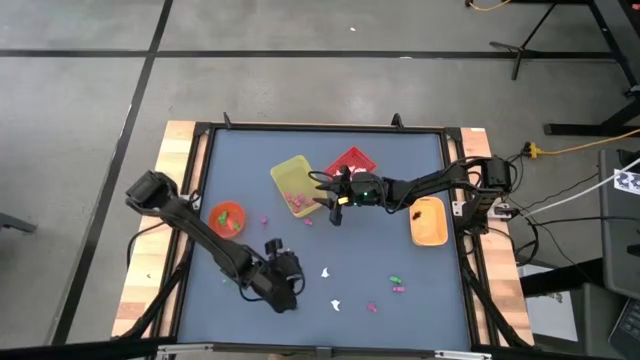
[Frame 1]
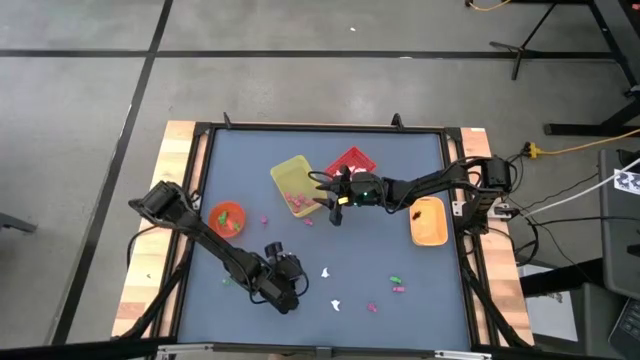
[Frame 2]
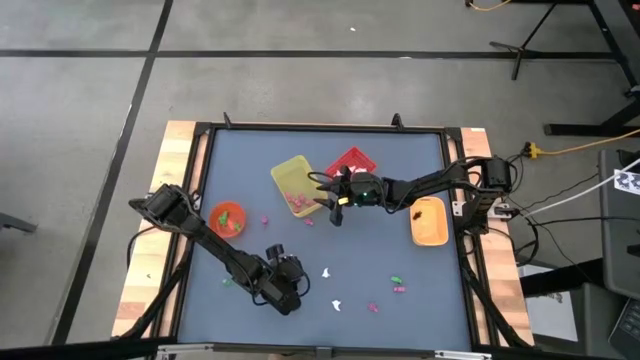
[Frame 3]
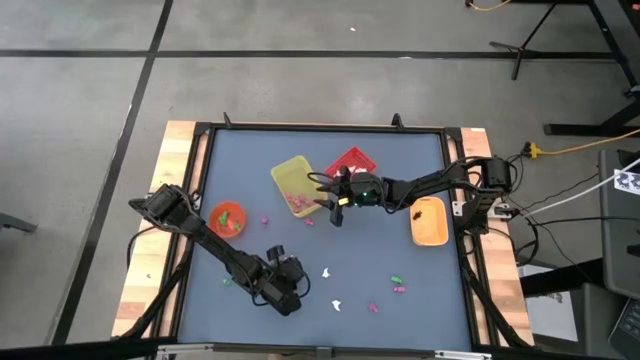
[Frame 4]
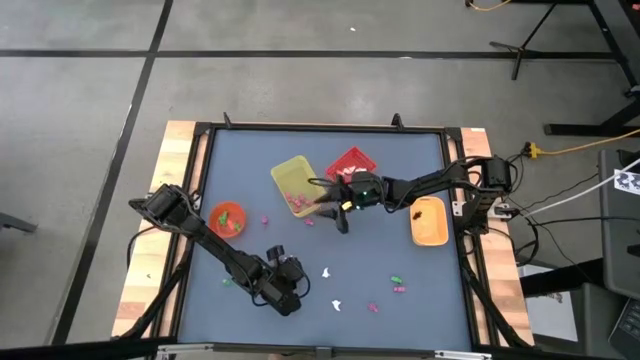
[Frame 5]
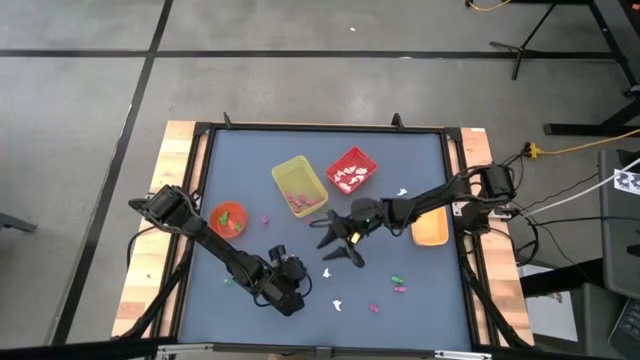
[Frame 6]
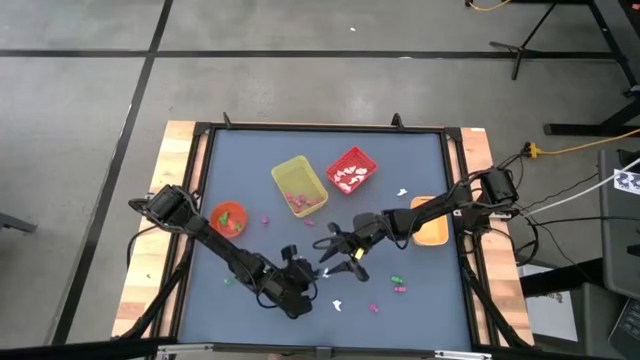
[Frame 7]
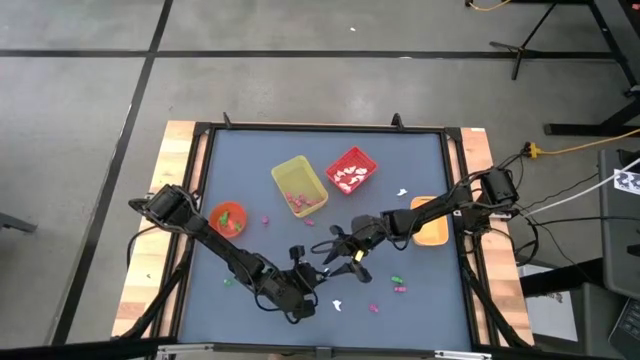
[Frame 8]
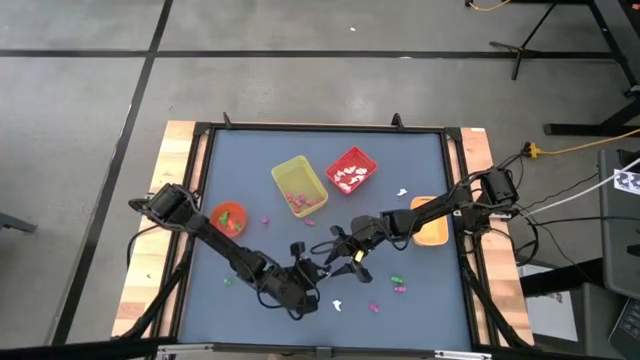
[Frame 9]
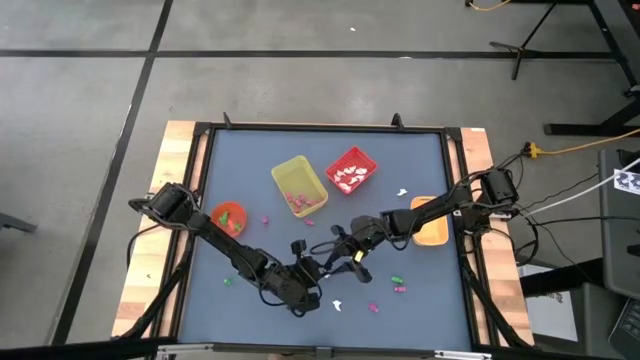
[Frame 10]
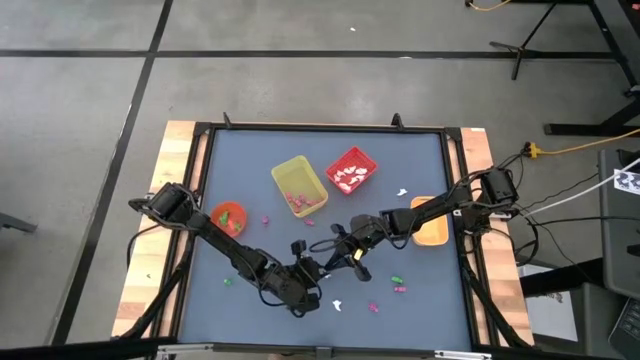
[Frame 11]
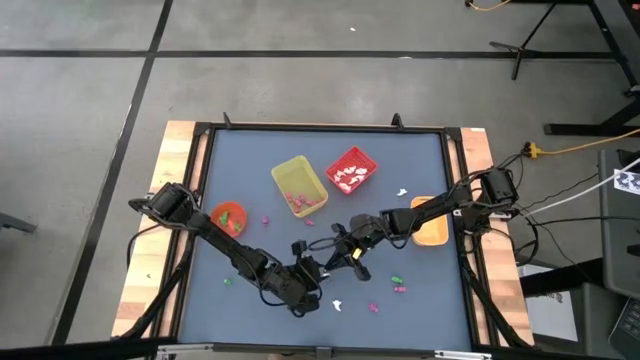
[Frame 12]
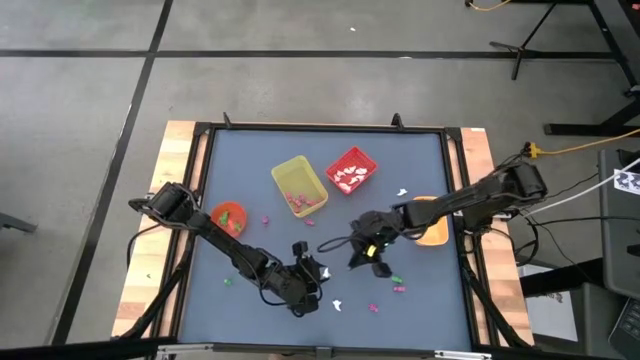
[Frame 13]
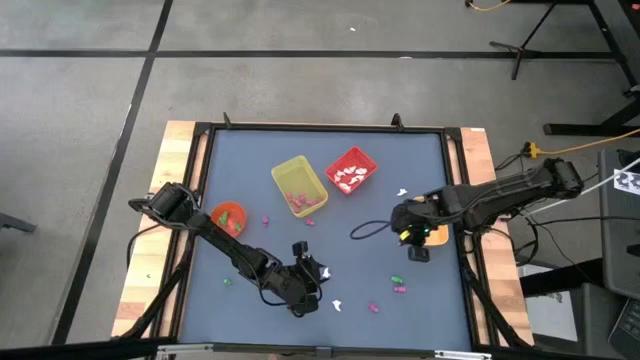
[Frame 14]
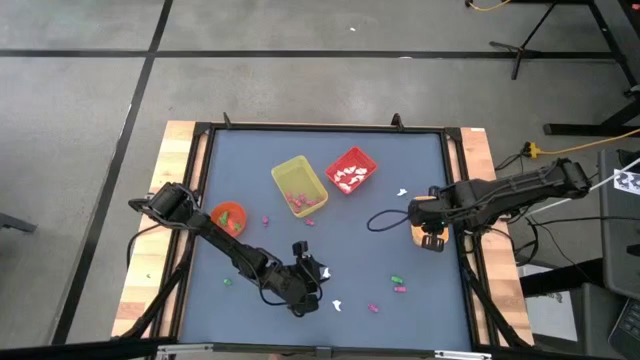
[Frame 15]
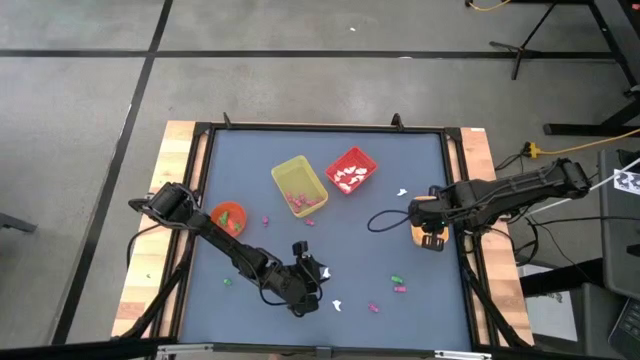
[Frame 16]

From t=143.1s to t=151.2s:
Task: Sort Halloween decoration
Put the black skeleton toy into the light orange bin

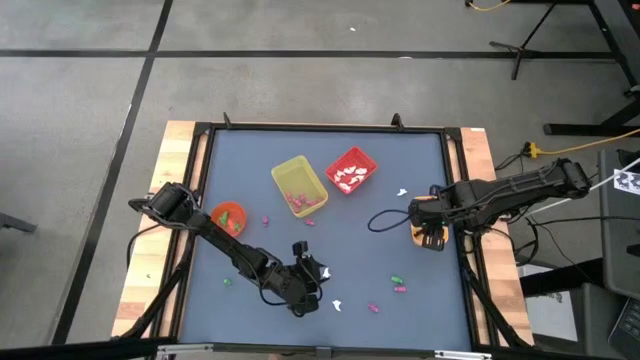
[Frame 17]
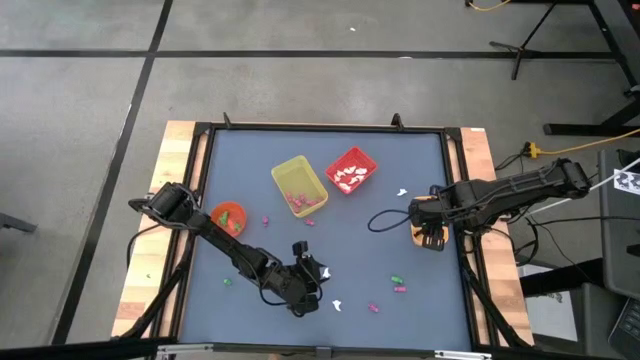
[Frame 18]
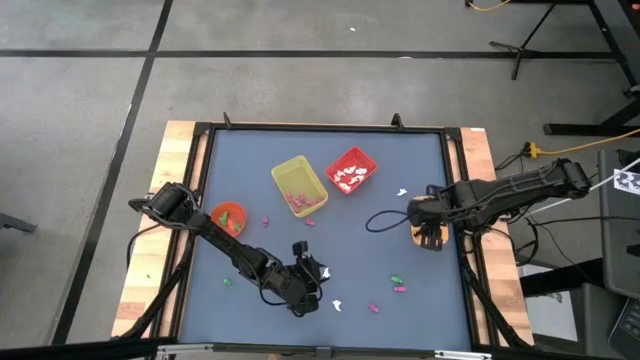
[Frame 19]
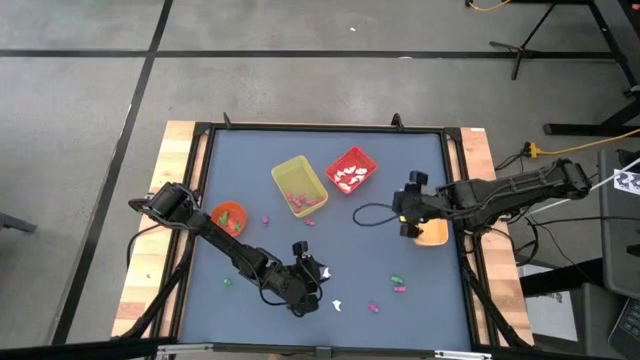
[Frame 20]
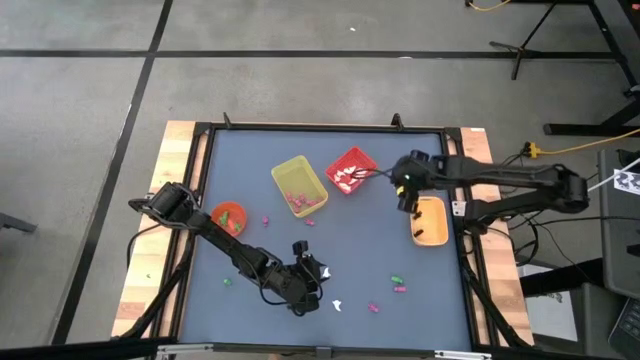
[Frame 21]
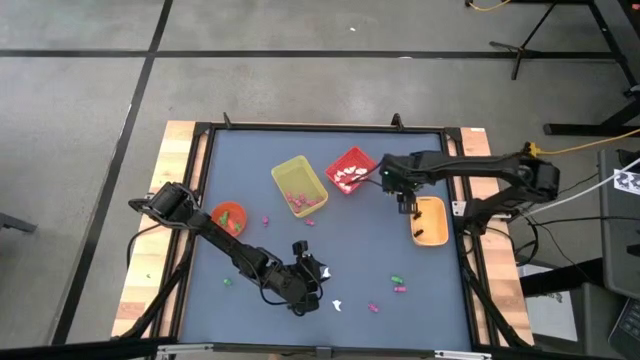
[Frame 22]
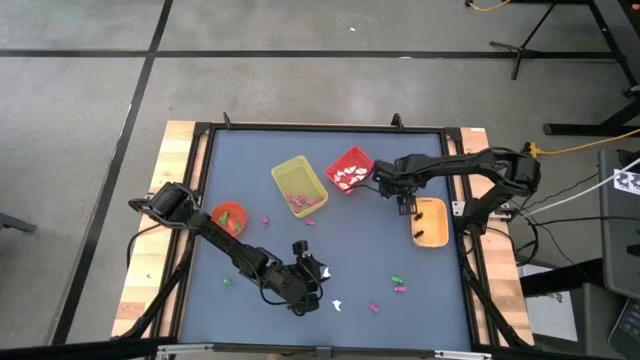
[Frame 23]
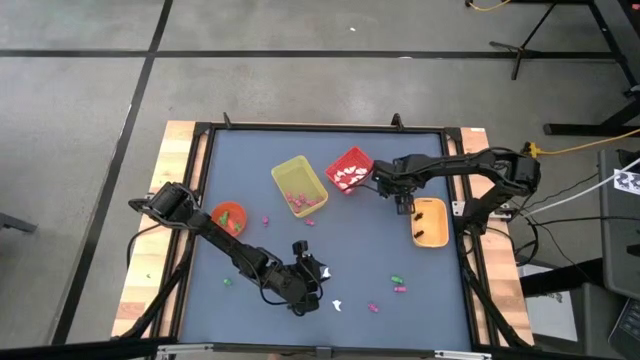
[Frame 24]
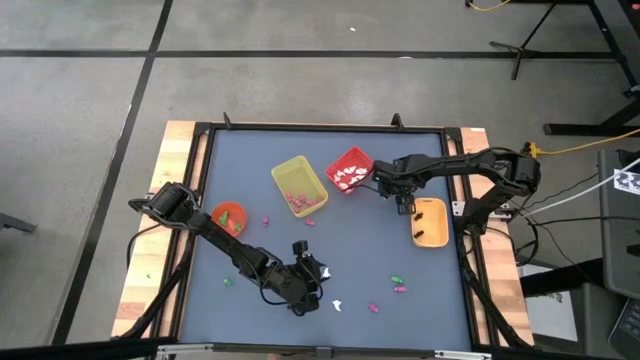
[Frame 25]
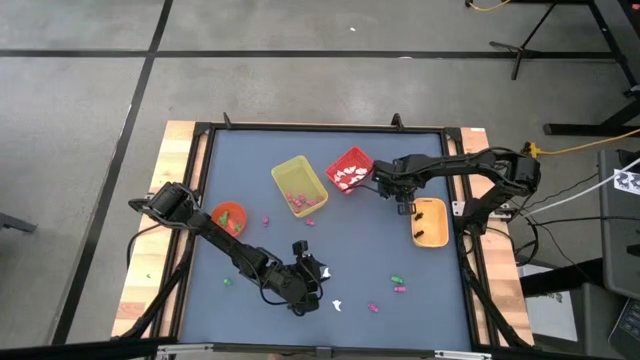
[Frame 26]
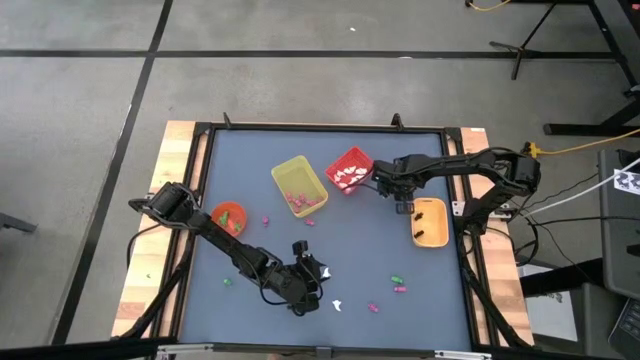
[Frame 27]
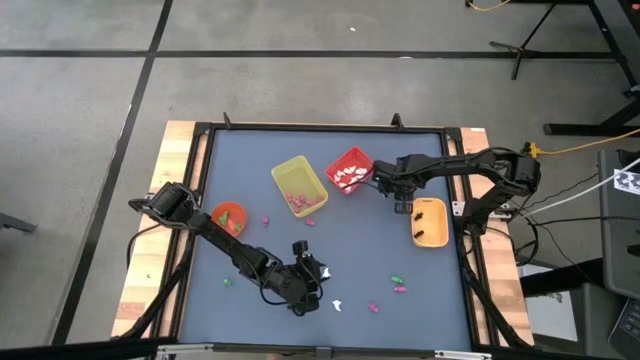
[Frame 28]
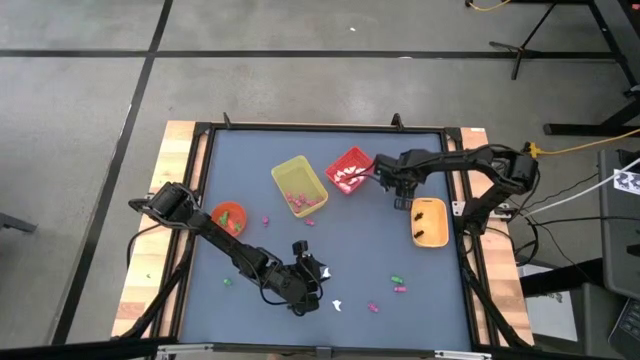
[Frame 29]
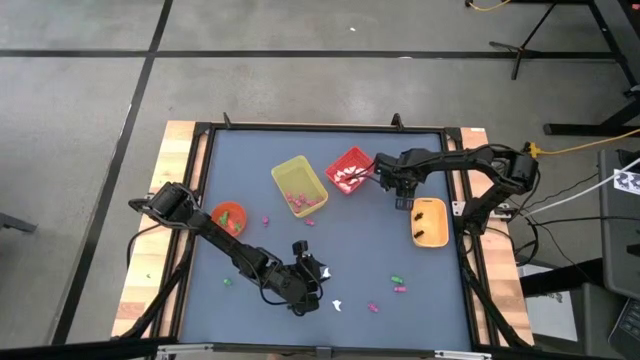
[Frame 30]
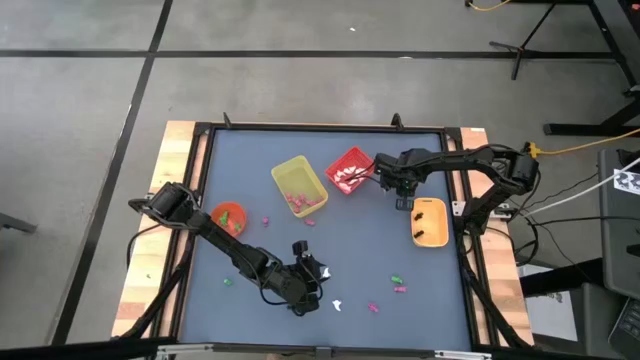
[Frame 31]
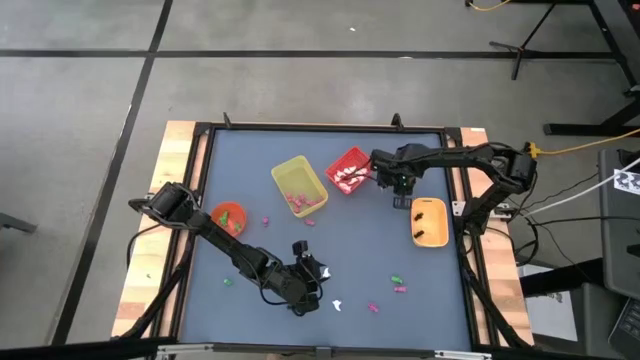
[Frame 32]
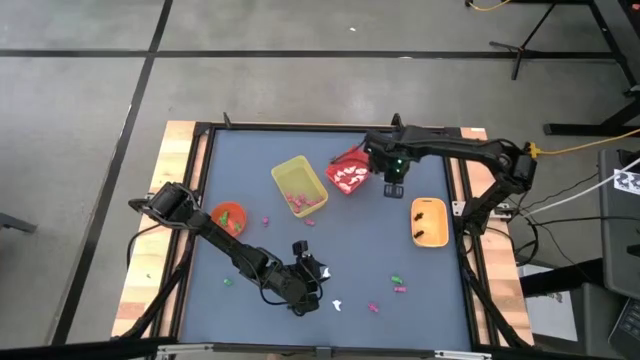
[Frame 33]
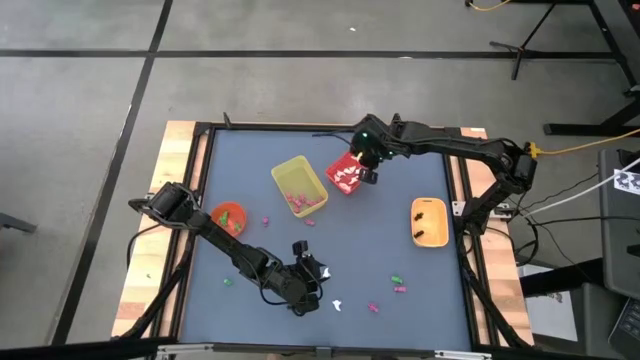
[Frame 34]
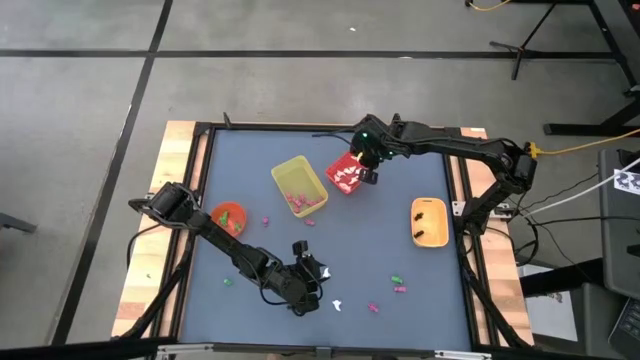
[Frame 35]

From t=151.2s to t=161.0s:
Put the white ghost toy into the red bin

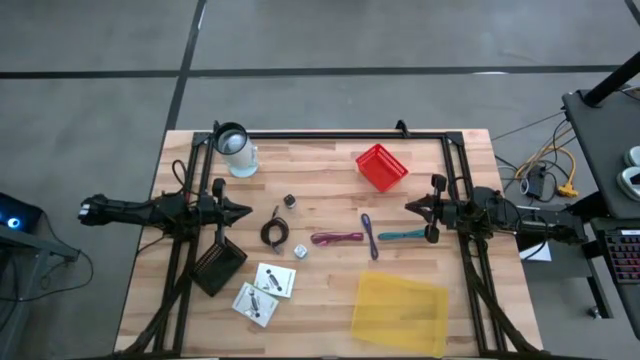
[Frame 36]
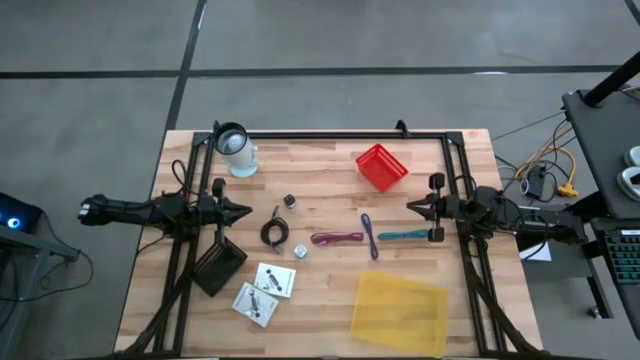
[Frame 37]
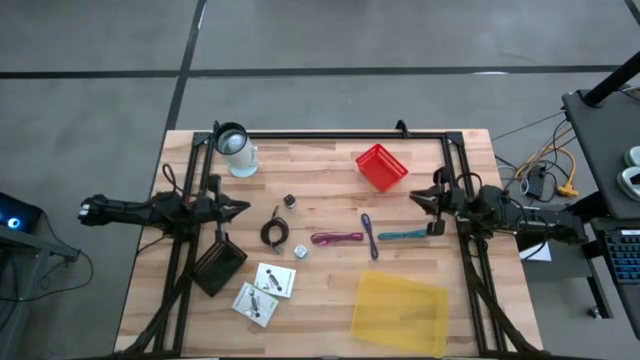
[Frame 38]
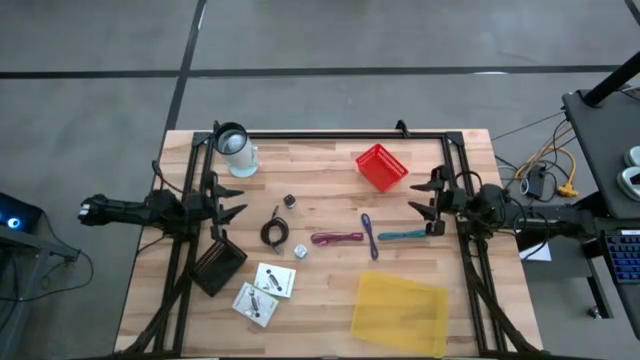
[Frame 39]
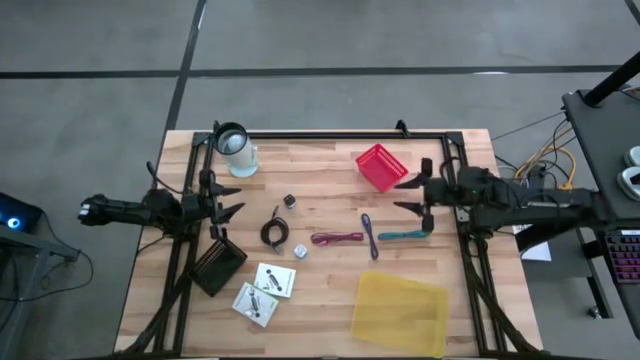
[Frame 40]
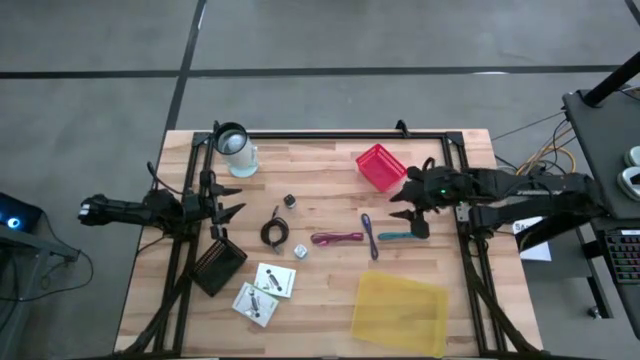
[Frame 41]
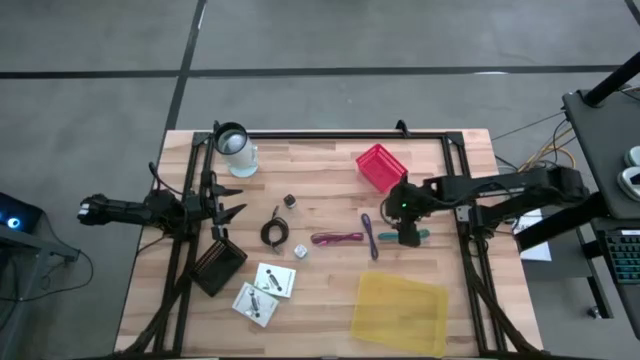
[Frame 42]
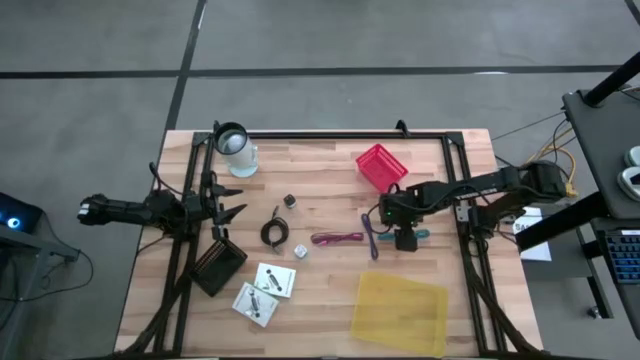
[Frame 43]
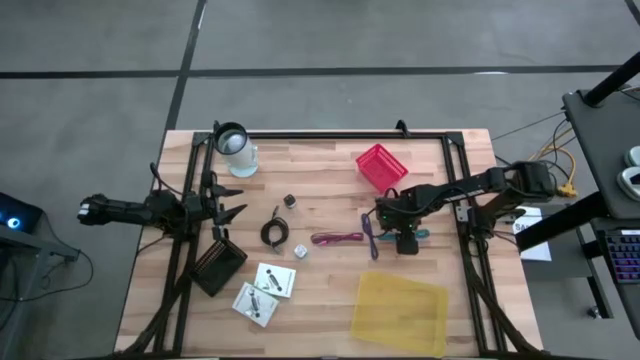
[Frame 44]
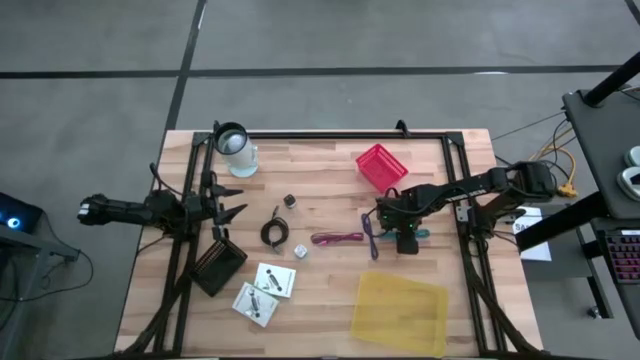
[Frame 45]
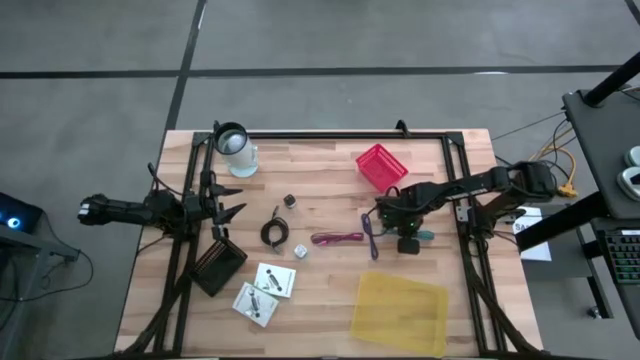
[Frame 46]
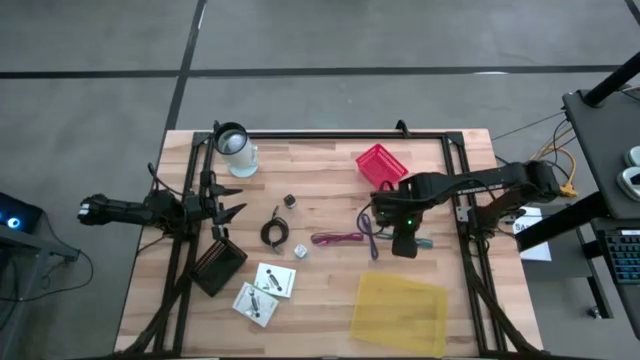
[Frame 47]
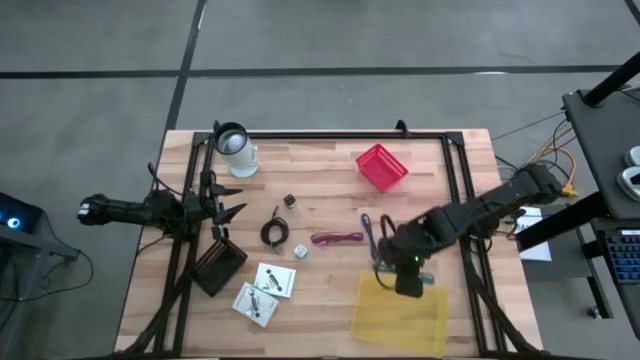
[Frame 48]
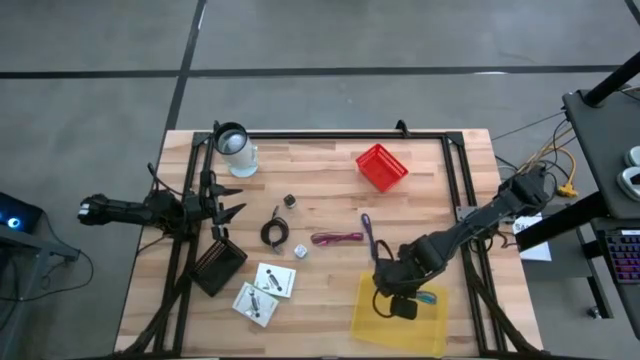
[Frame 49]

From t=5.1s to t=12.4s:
Task: Pick and place items into bin
Put the light blue patterned charger cable into the yellow bin
